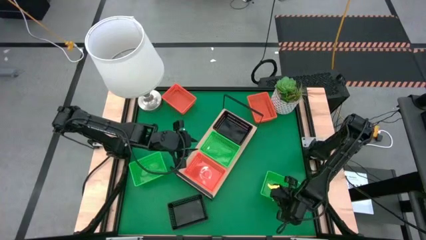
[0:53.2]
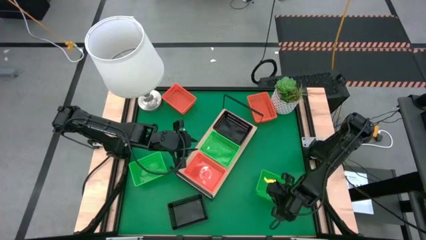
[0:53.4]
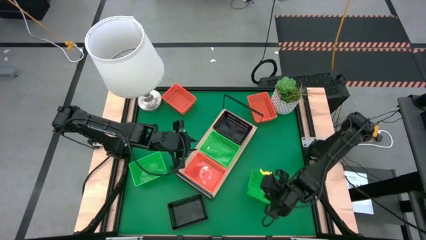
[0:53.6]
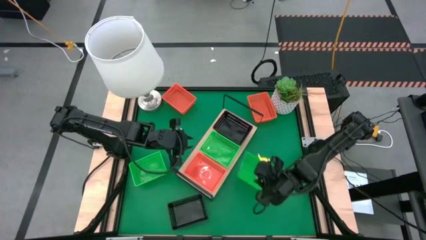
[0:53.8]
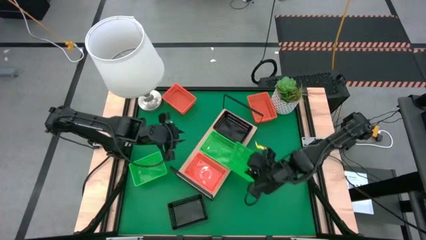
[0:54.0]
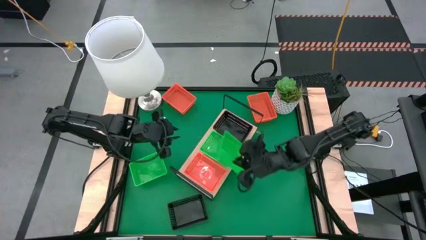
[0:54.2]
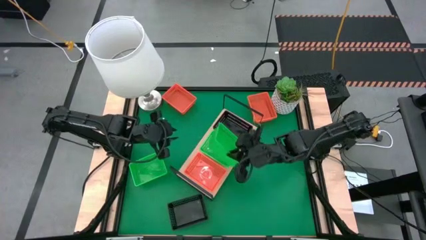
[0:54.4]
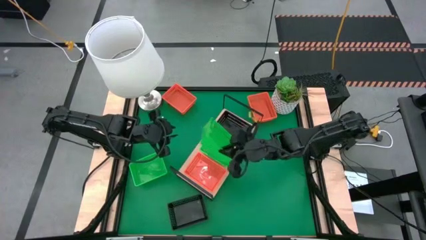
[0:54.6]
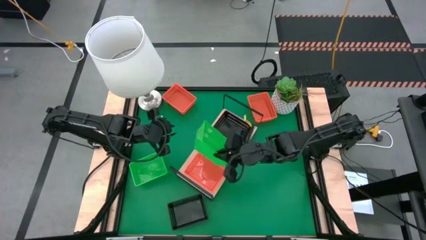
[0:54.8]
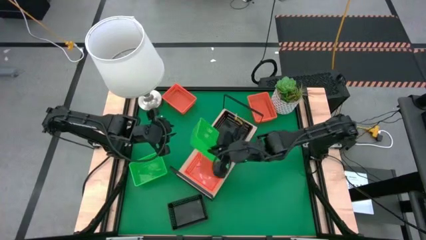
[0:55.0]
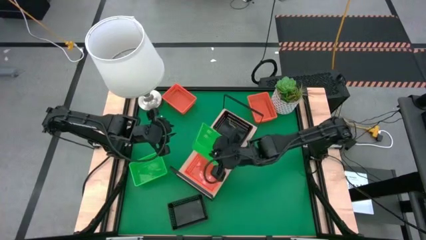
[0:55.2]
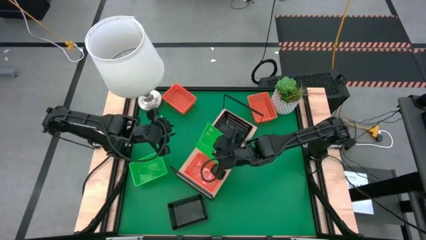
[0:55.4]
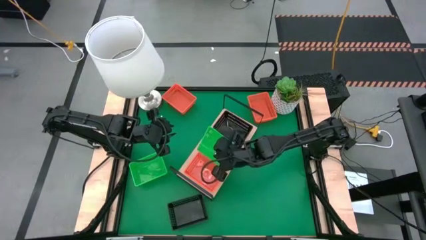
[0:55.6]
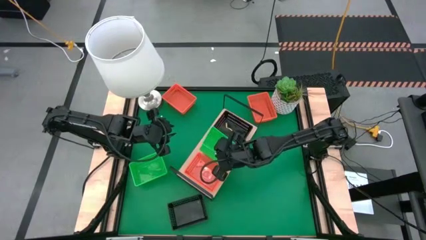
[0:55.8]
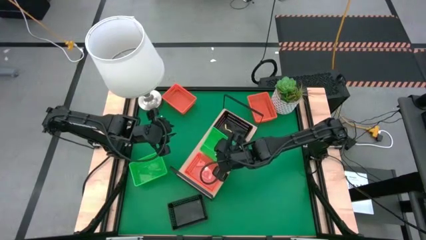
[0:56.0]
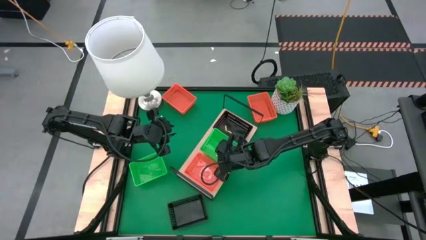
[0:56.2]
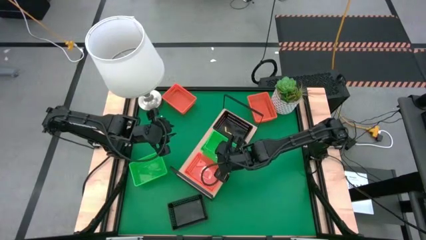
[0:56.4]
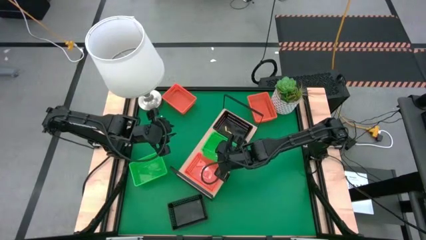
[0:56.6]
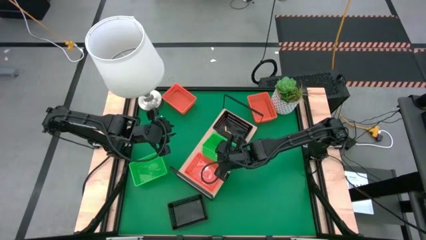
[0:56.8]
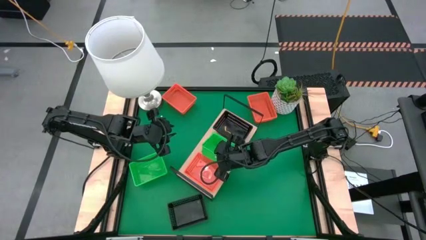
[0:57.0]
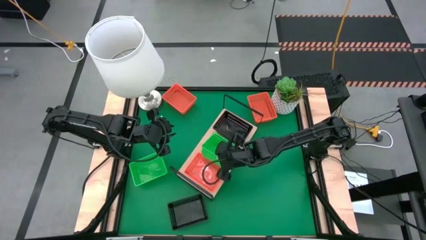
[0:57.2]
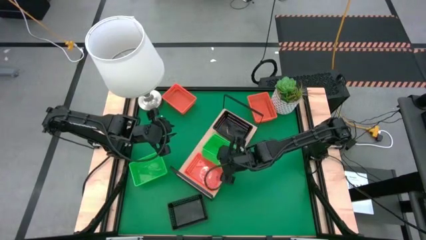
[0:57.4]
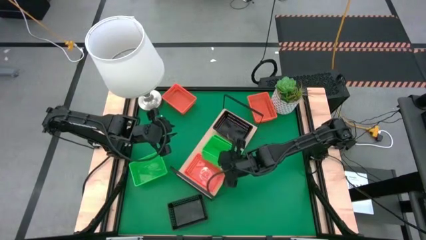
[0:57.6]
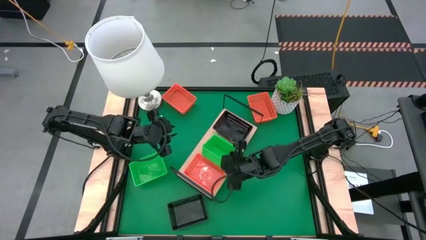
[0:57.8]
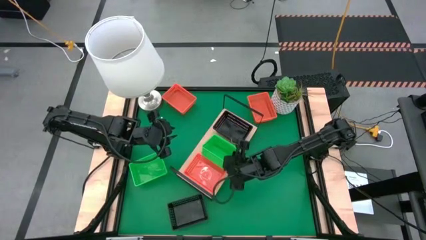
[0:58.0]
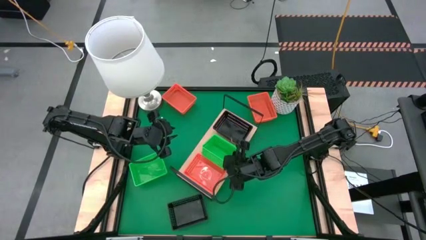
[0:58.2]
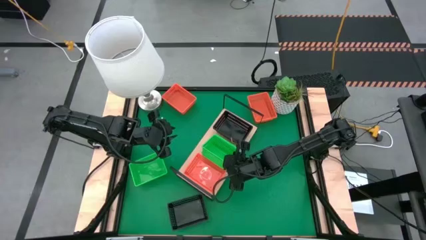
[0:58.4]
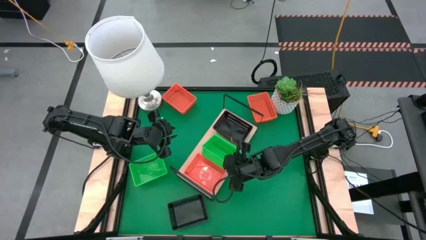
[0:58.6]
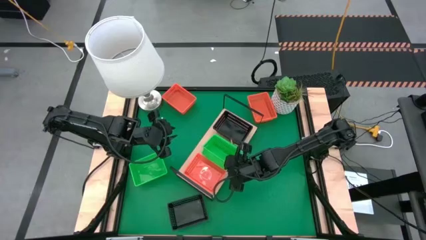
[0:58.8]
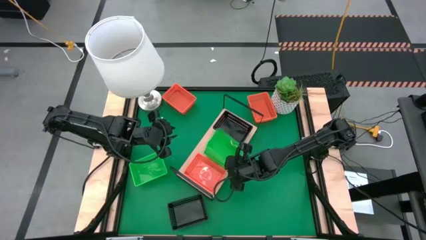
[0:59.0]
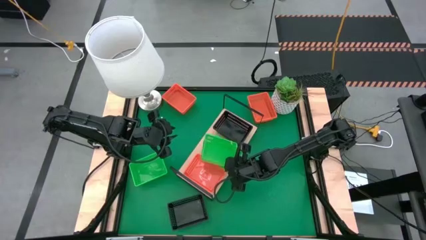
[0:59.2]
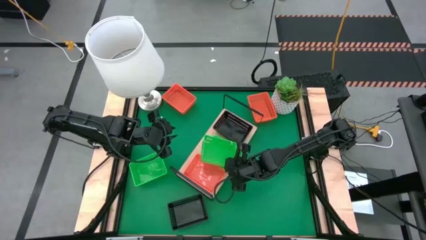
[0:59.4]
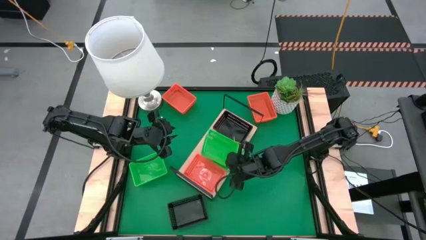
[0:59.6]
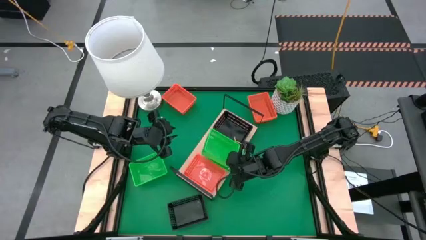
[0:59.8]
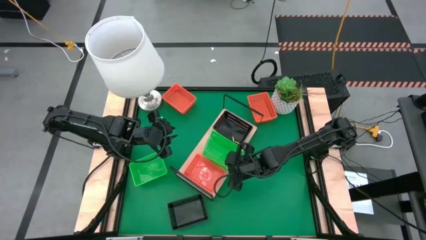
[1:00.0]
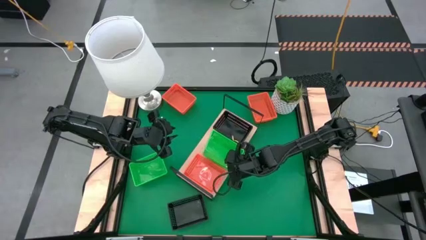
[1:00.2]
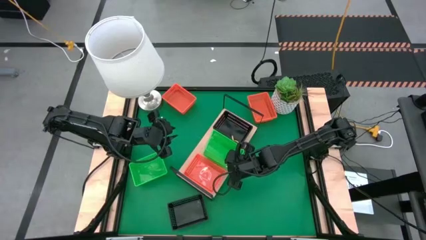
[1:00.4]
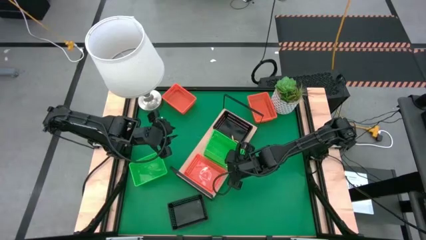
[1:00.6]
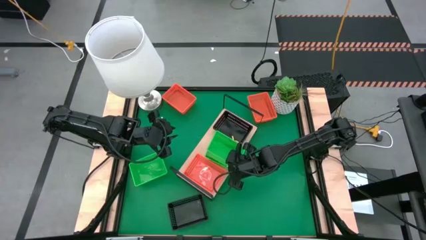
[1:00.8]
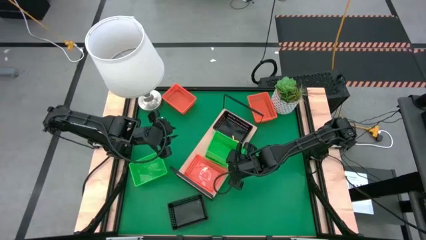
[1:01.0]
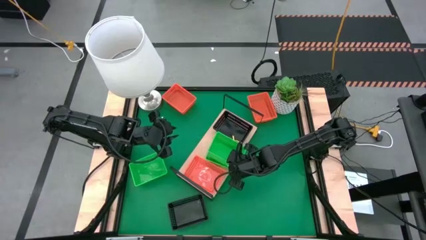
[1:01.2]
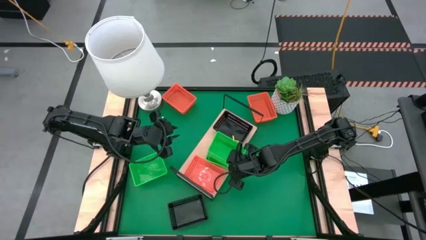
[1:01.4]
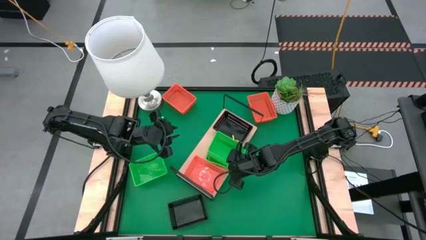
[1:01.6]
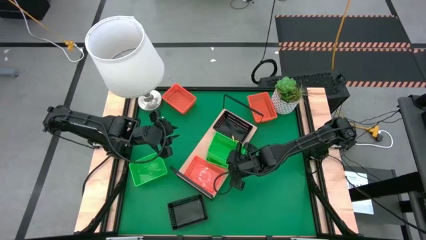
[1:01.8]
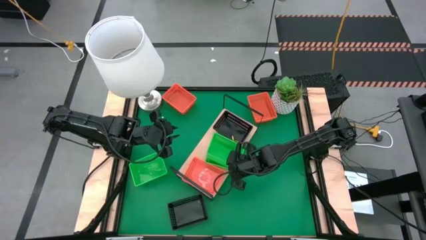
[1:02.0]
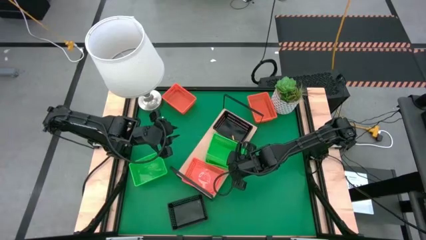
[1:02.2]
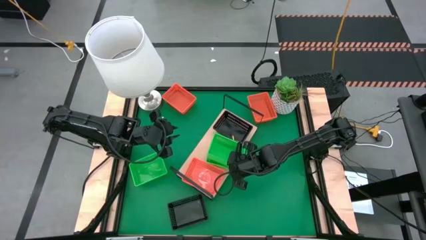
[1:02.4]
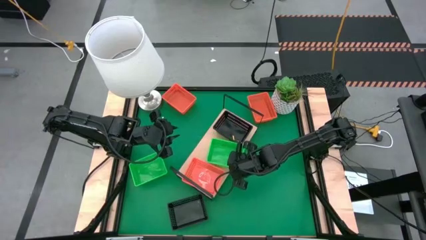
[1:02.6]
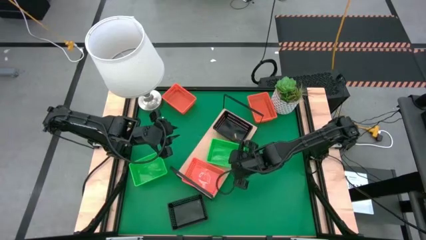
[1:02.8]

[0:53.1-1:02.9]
Task: Stack baskets on shelf by color
Stack the right green bin into the green bin on the shelf

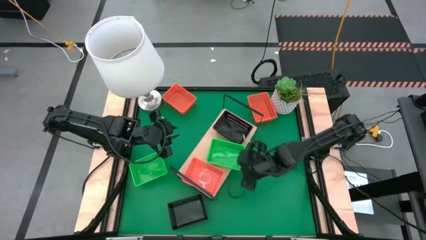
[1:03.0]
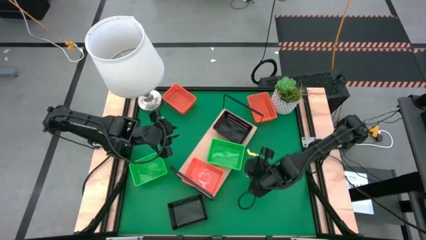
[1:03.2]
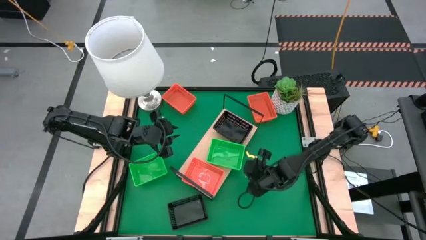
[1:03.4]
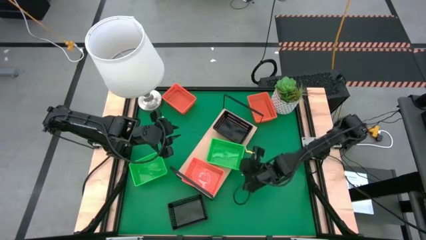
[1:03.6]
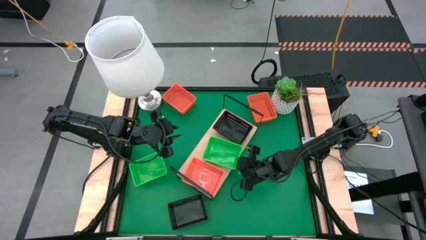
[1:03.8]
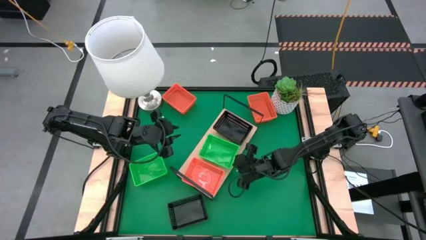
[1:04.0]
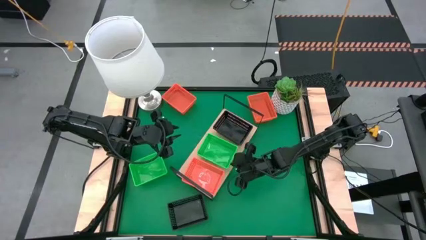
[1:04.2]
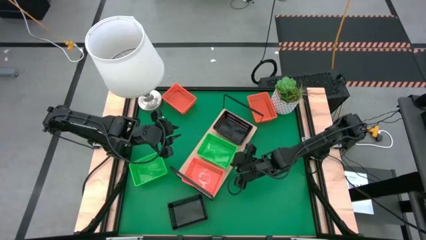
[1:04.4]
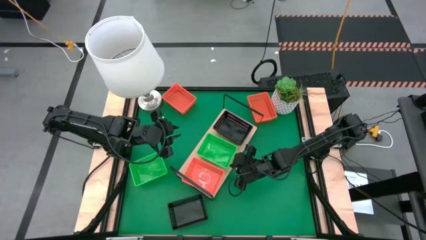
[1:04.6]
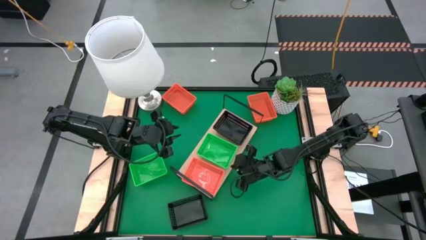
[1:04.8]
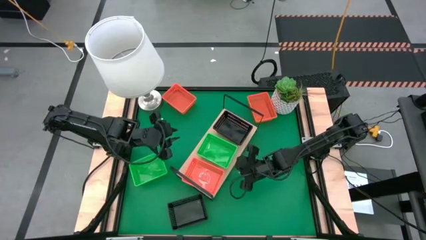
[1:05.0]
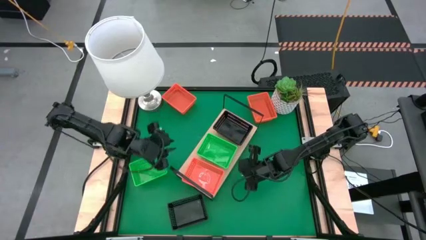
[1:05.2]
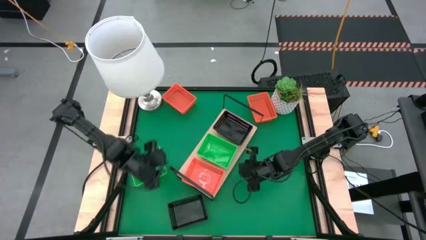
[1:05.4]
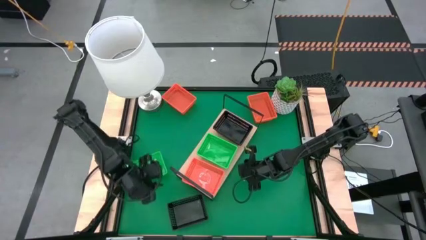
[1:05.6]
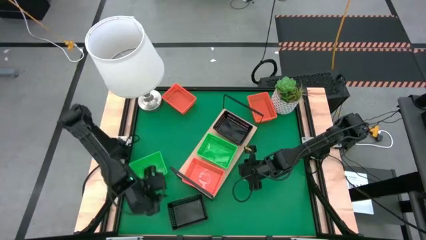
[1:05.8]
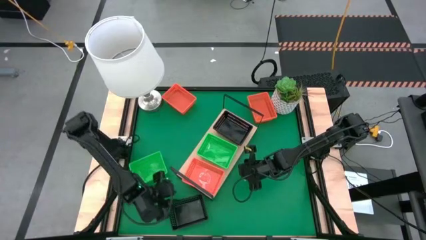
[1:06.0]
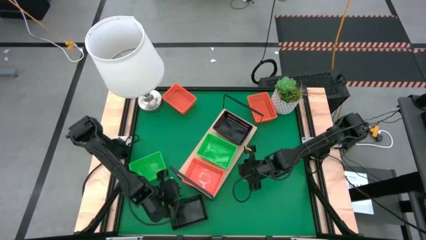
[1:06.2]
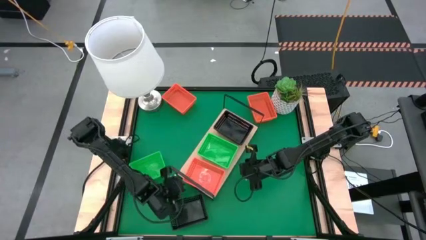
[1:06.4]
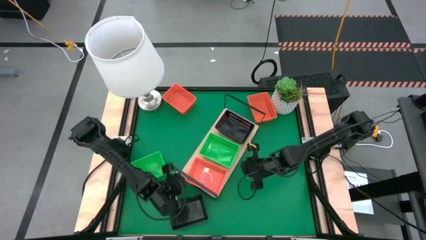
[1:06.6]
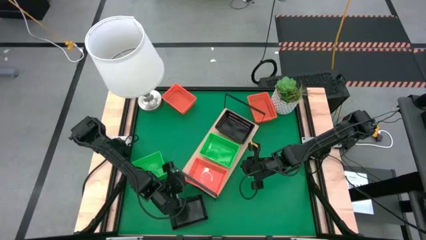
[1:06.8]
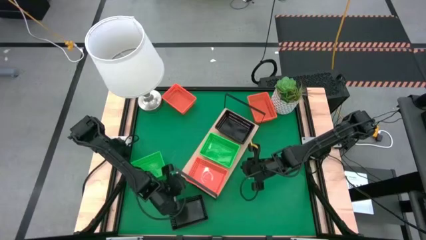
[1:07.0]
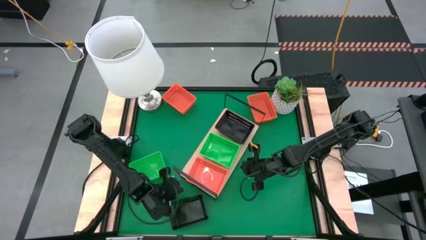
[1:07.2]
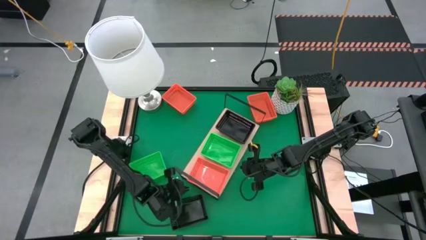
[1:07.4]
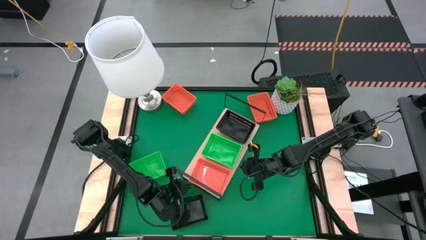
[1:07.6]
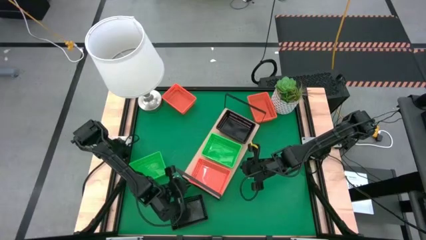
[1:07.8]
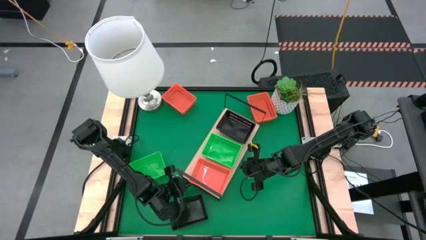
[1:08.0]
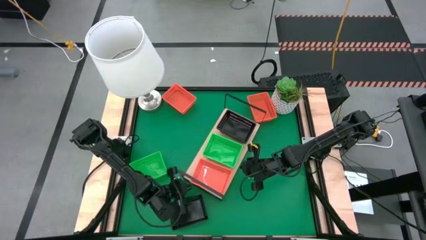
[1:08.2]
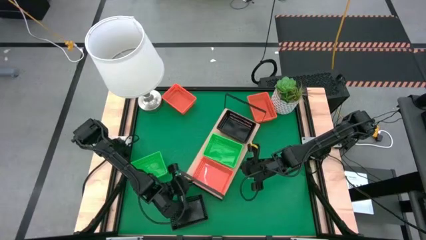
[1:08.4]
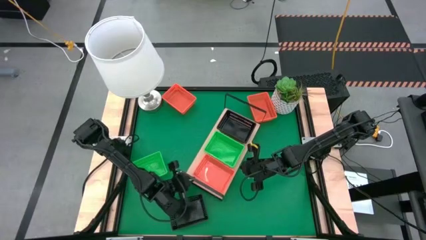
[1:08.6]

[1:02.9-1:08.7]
Adjust the colored bins
